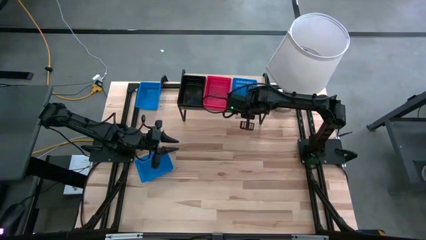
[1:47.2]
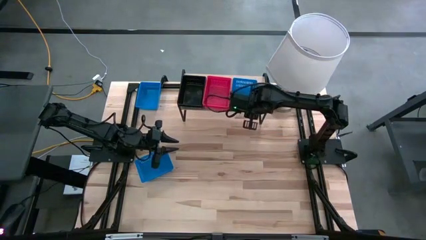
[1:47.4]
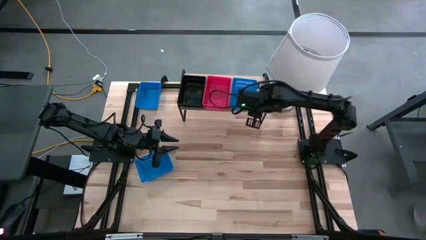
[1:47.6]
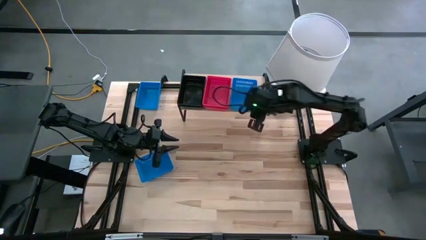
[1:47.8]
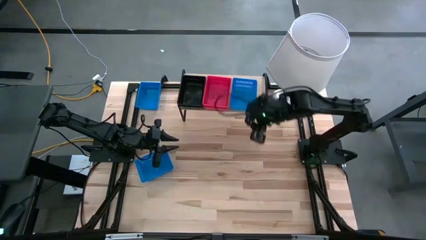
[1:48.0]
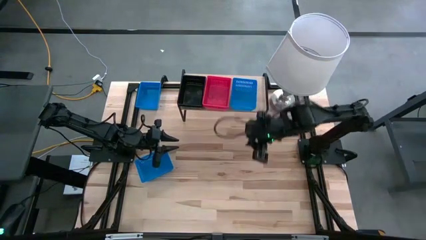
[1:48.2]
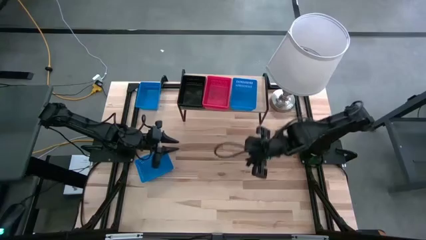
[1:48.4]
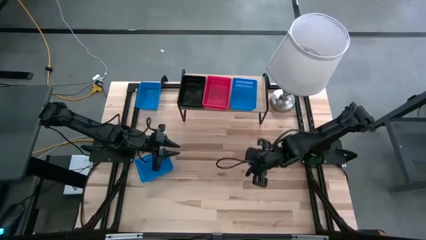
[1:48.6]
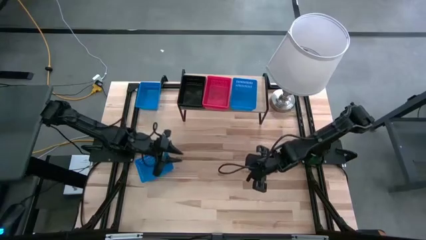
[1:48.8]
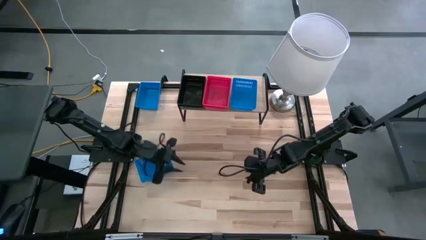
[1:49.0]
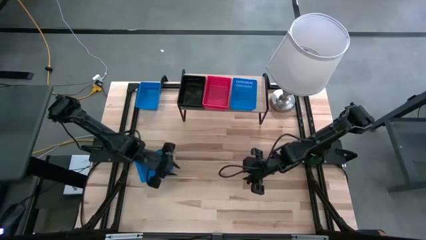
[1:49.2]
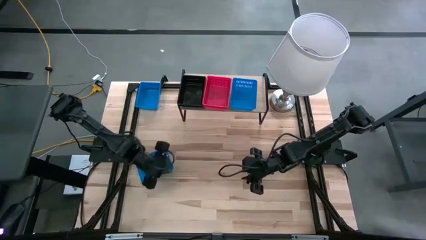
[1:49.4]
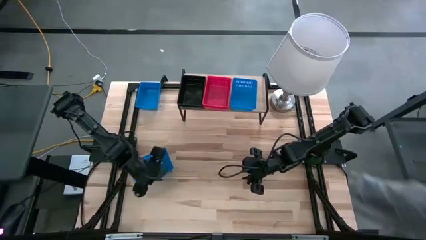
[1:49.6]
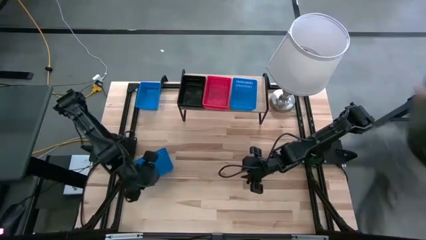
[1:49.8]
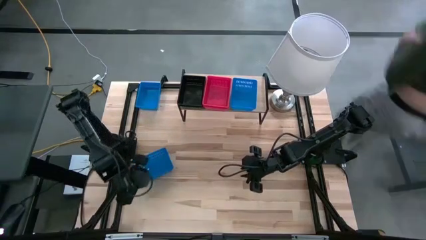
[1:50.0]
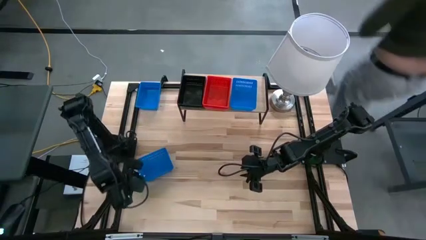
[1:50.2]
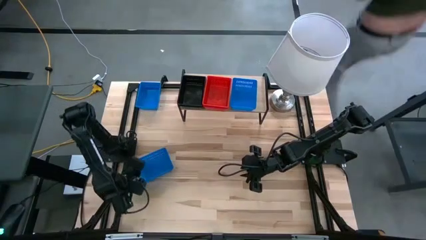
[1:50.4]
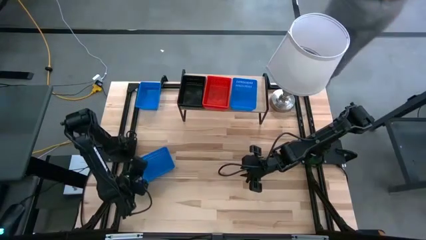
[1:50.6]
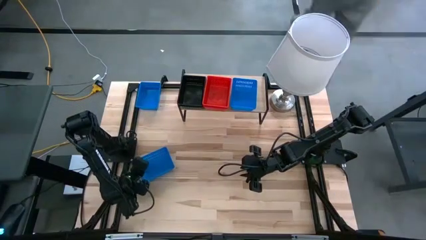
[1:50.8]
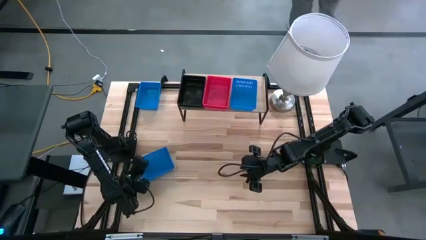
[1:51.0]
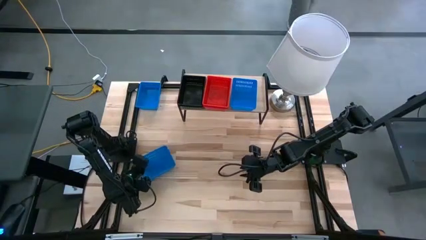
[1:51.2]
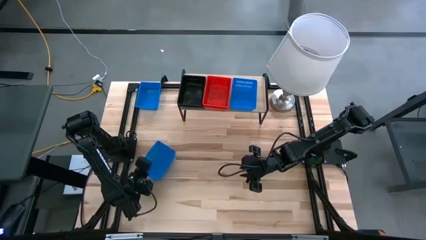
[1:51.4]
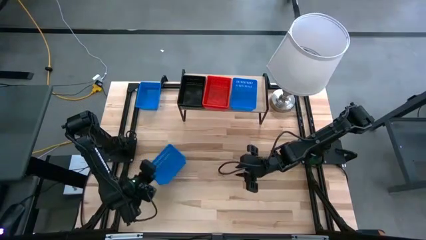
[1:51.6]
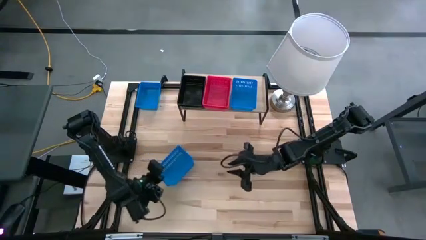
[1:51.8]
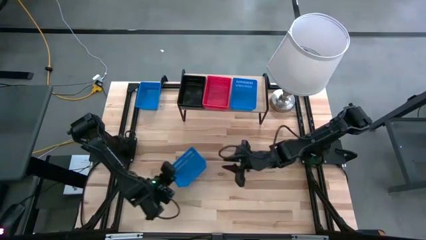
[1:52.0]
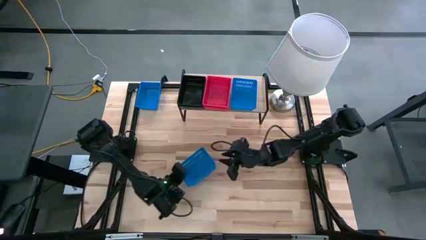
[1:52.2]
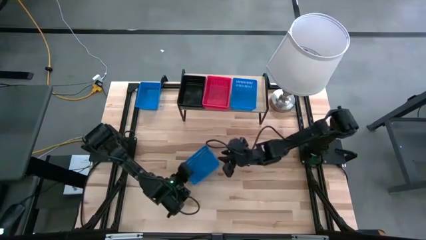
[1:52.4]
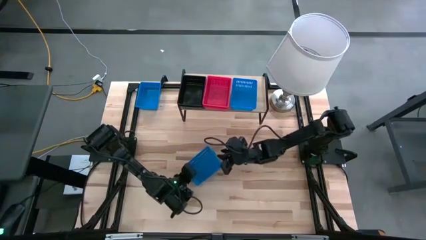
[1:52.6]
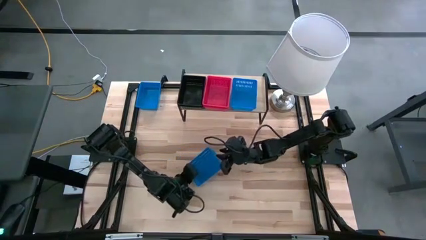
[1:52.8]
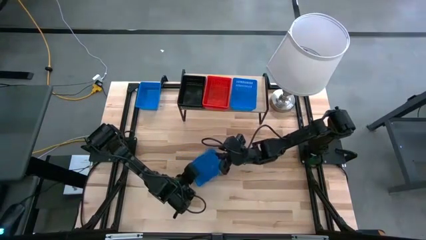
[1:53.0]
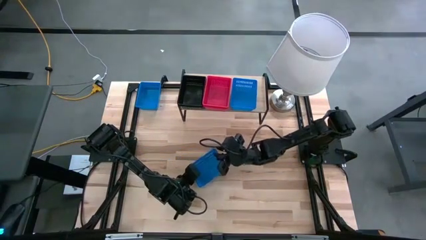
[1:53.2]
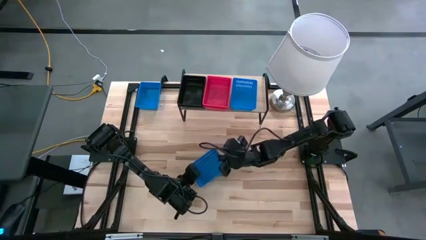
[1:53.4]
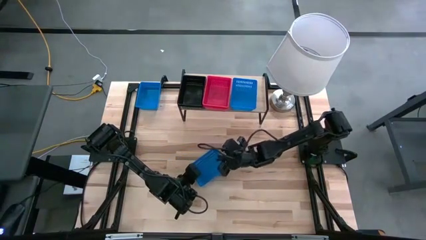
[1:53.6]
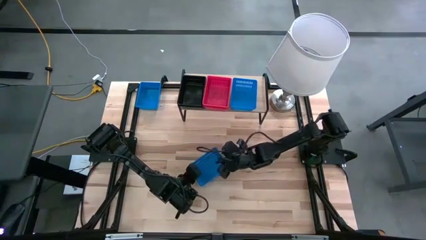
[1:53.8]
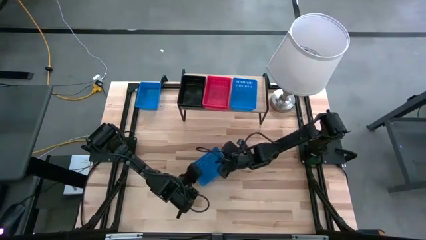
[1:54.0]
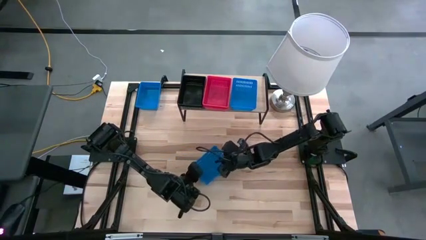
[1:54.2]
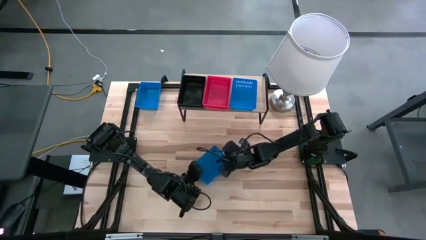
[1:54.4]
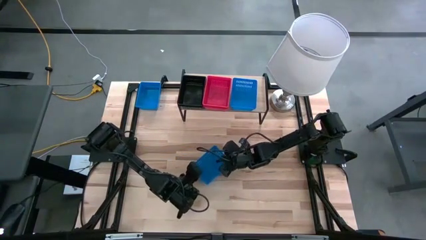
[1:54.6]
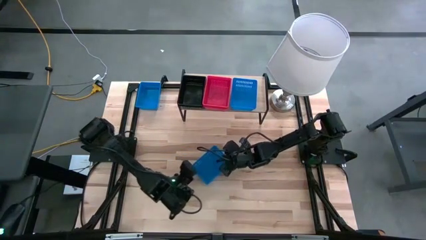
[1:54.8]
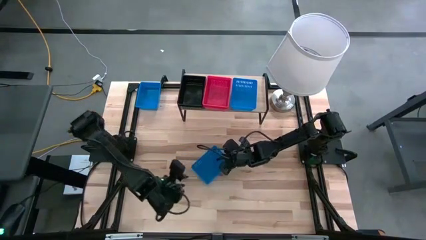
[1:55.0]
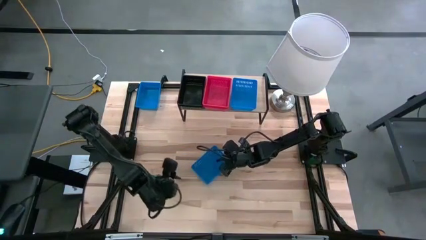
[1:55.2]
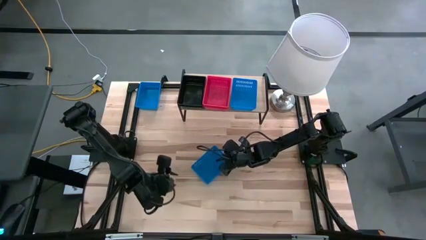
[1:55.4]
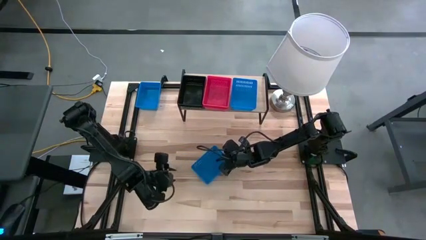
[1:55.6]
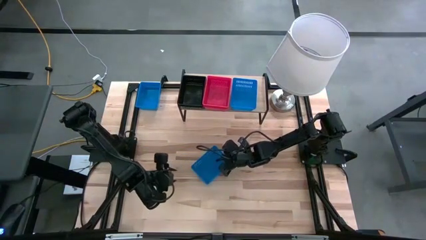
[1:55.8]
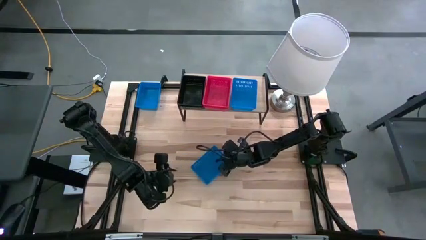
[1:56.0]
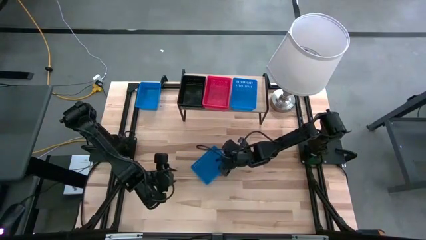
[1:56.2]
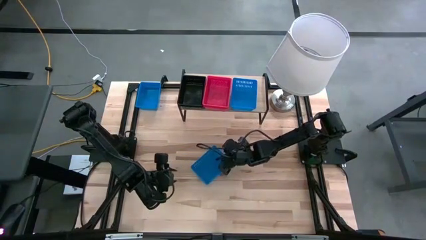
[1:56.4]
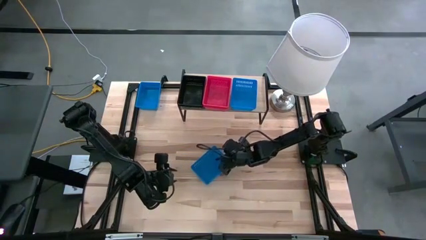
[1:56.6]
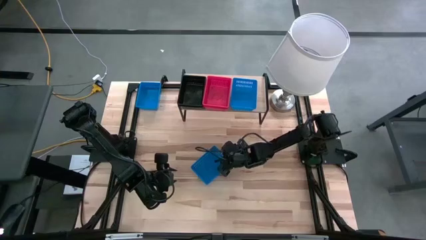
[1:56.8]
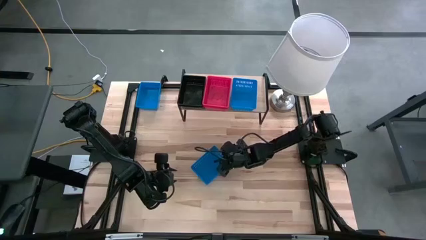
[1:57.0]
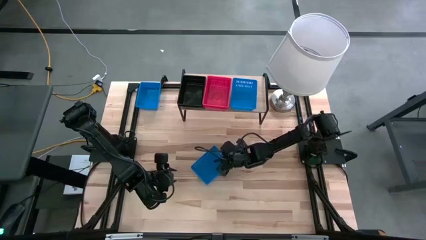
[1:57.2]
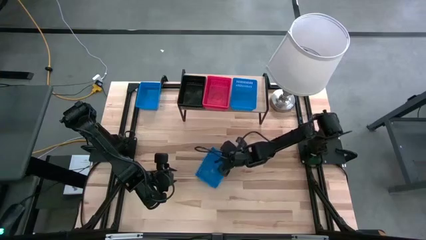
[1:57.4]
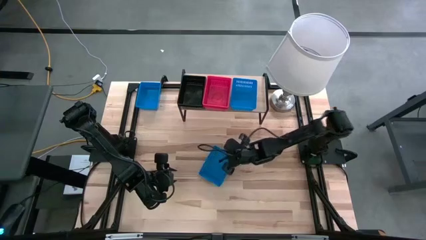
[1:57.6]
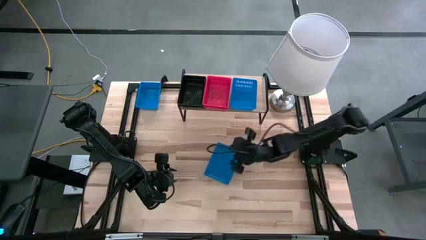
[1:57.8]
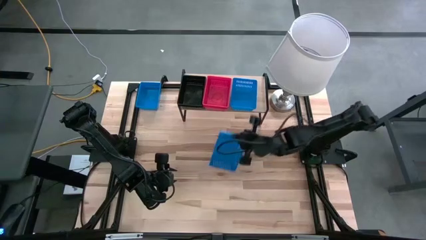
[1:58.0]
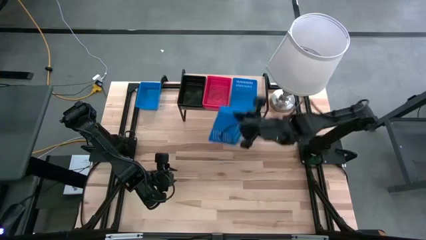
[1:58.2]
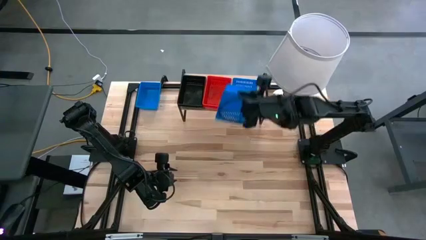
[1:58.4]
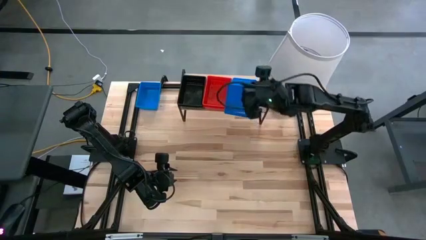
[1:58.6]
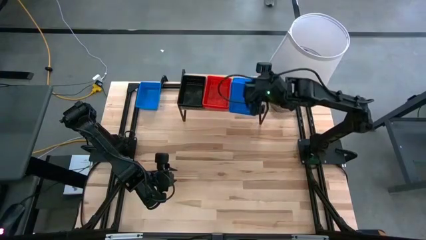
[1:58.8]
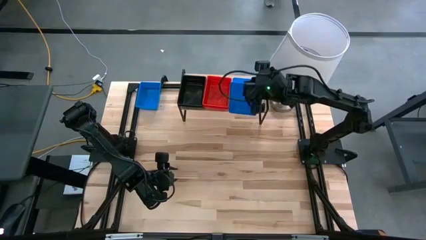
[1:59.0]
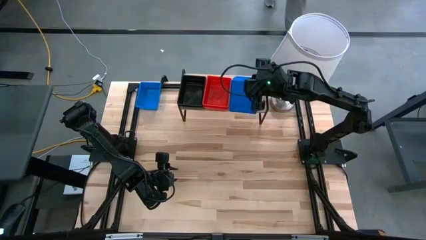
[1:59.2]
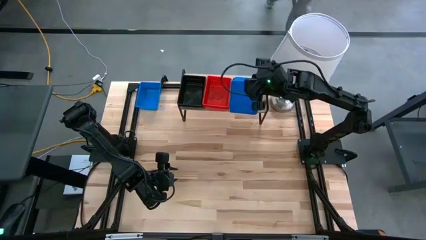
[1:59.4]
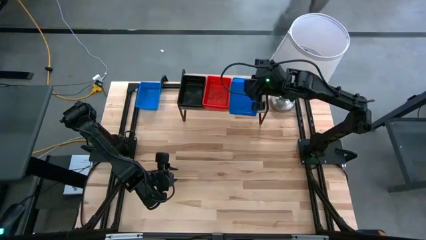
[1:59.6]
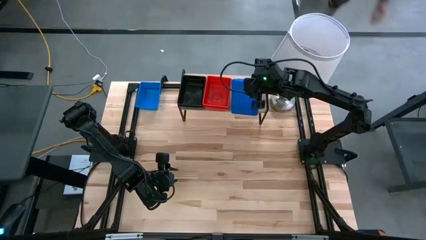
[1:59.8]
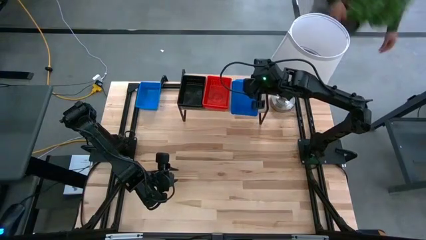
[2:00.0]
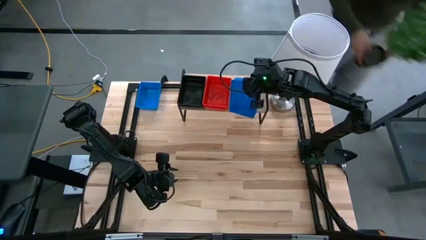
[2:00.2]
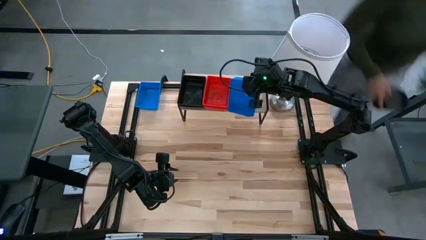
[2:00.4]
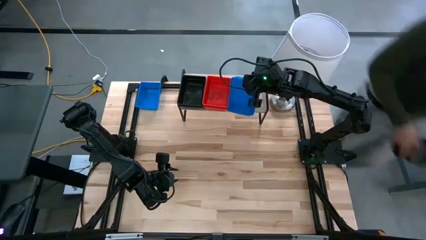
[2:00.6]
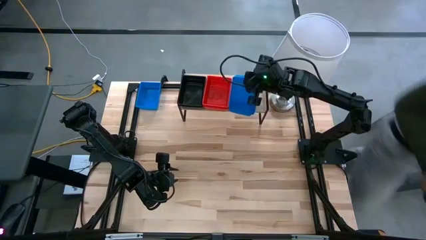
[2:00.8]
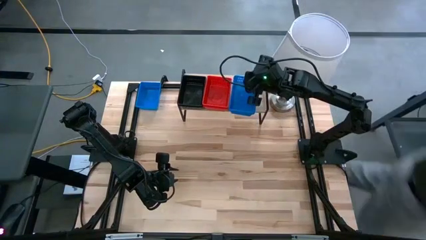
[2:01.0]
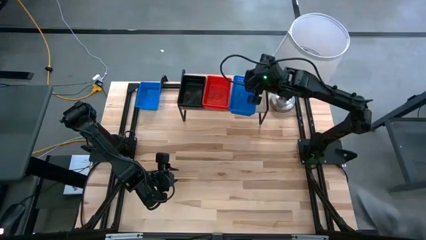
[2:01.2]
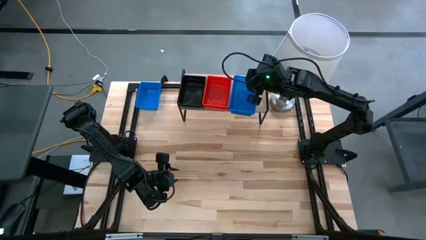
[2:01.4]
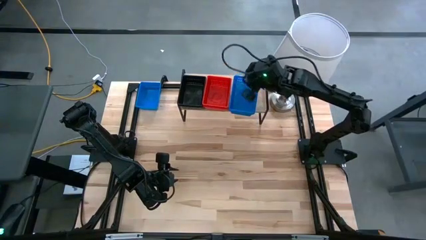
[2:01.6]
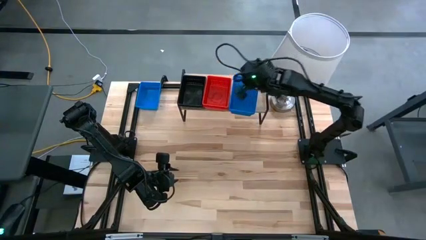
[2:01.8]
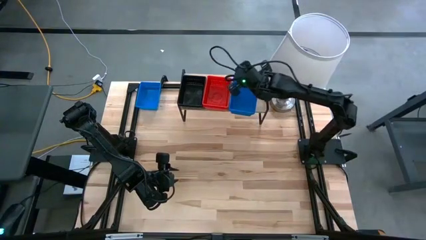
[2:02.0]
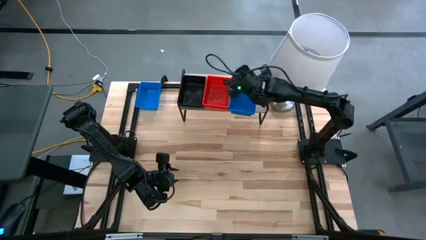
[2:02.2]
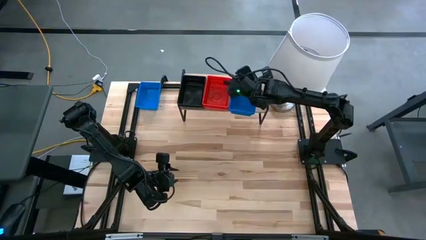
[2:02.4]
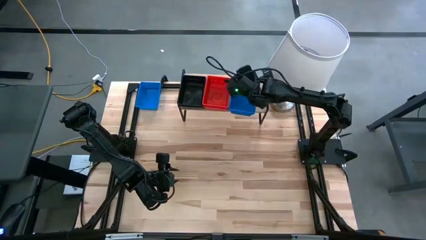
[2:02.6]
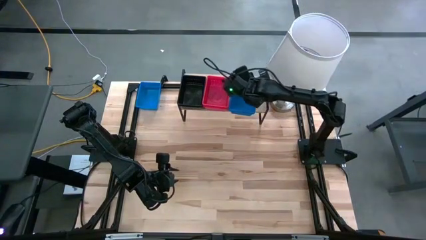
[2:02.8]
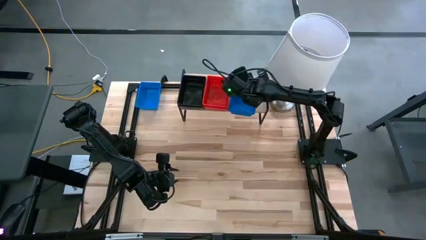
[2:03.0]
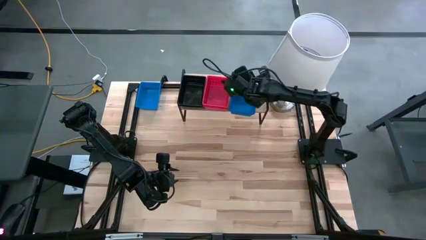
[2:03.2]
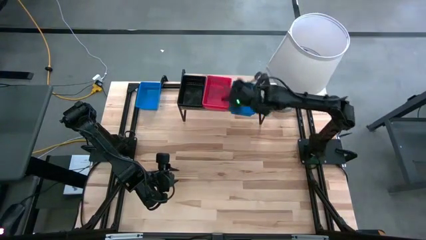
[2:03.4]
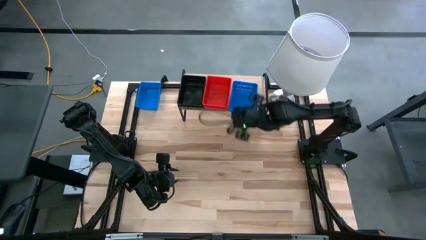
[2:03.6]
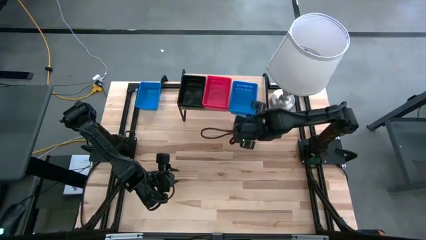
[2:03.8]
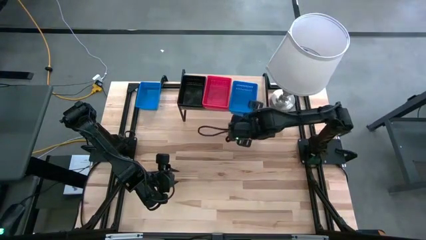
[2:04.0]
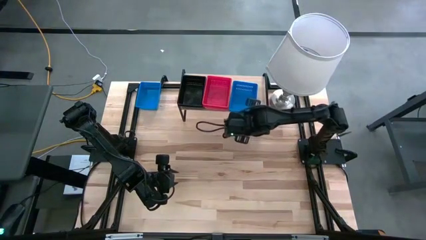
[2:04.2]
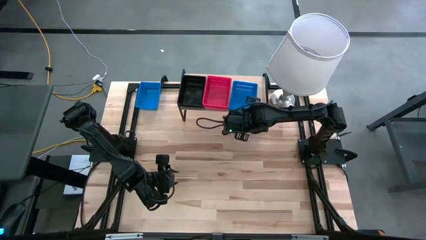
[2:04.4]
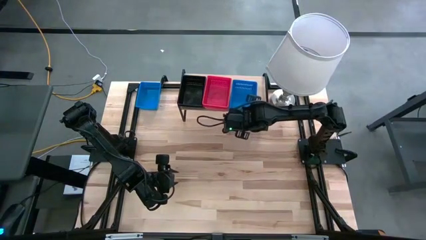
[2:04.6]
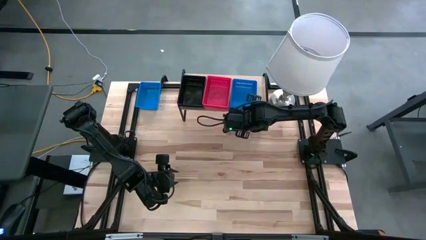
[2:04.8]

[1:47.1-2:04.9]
Task: Stack baskets on shelf by color
Stack the bottom blue bin on top of the blue bin on the shelf
